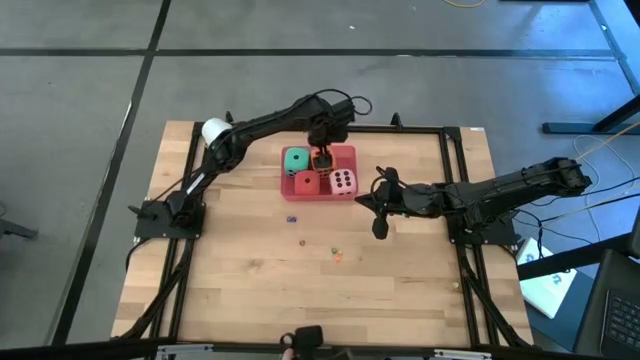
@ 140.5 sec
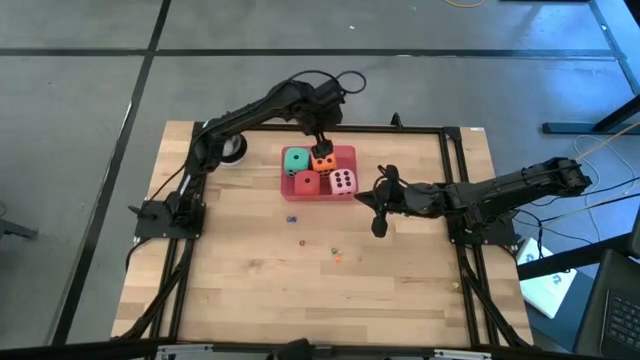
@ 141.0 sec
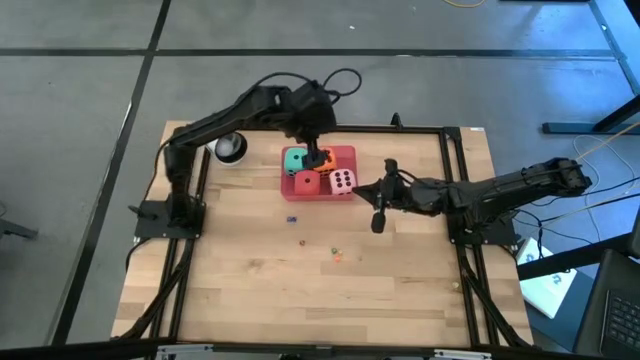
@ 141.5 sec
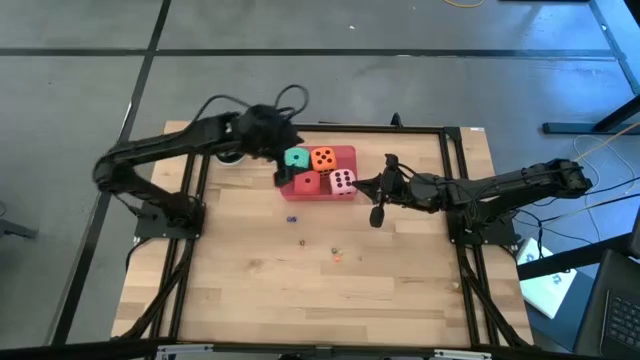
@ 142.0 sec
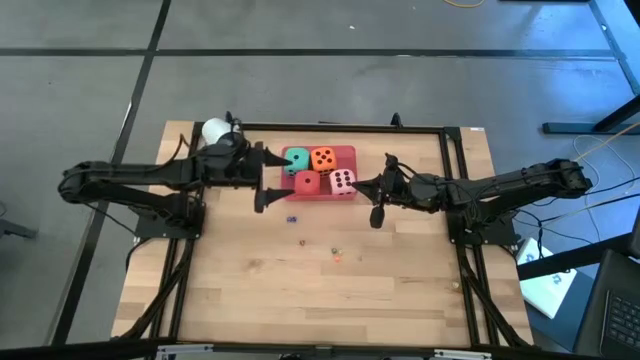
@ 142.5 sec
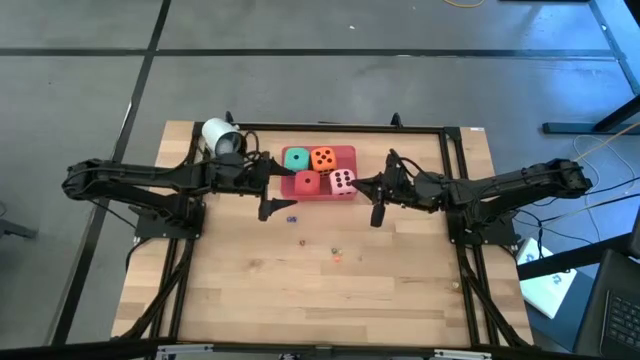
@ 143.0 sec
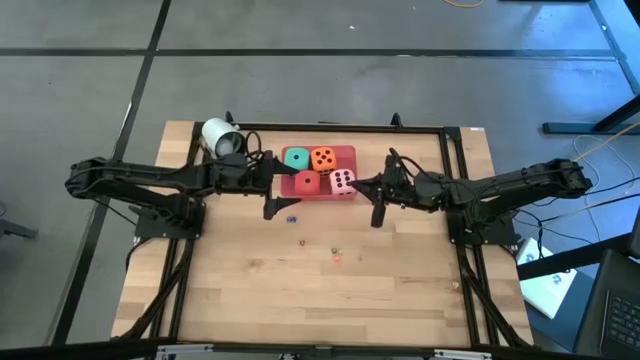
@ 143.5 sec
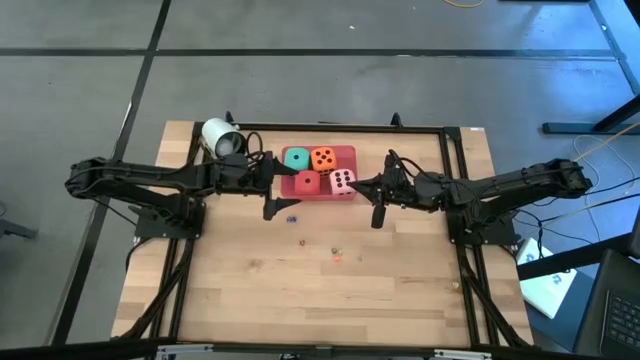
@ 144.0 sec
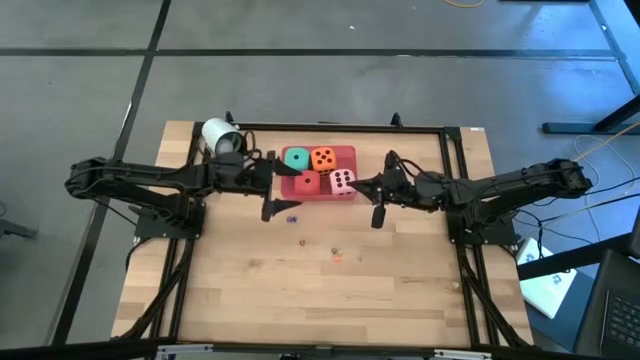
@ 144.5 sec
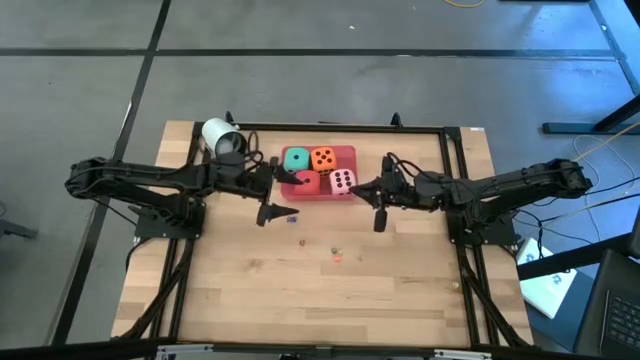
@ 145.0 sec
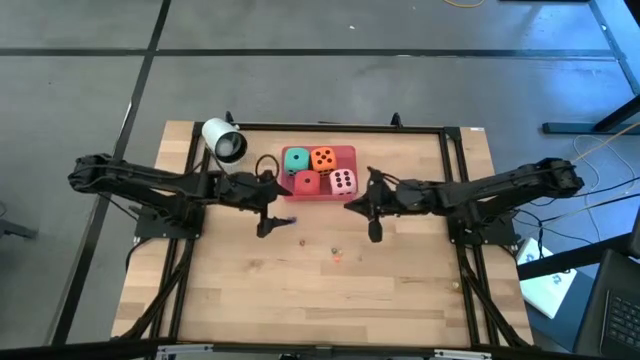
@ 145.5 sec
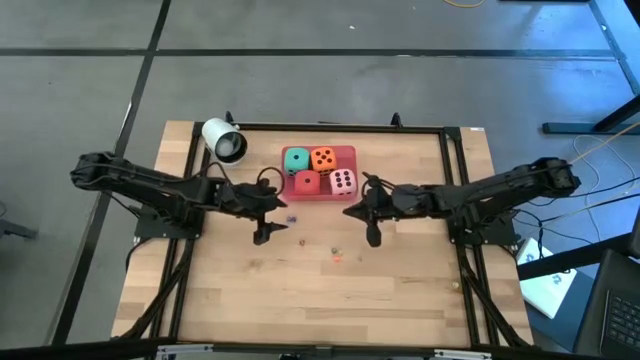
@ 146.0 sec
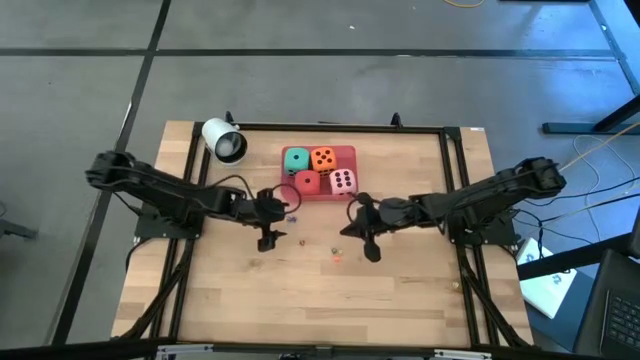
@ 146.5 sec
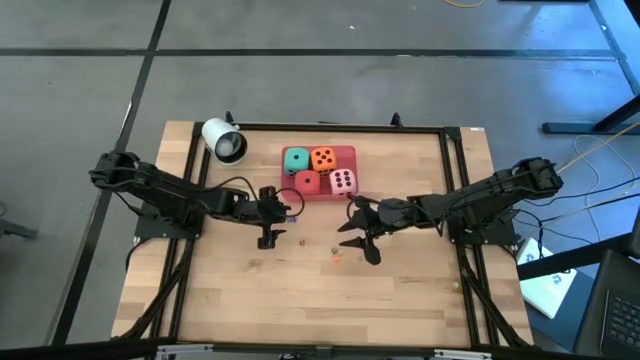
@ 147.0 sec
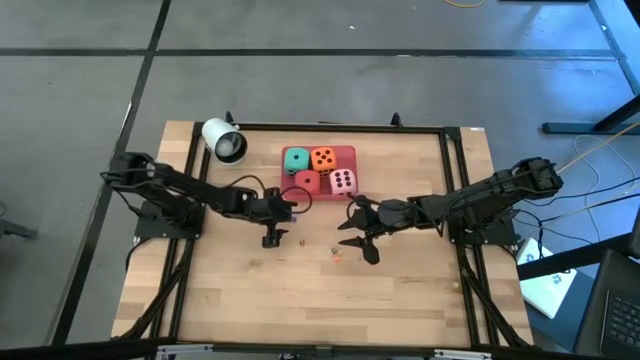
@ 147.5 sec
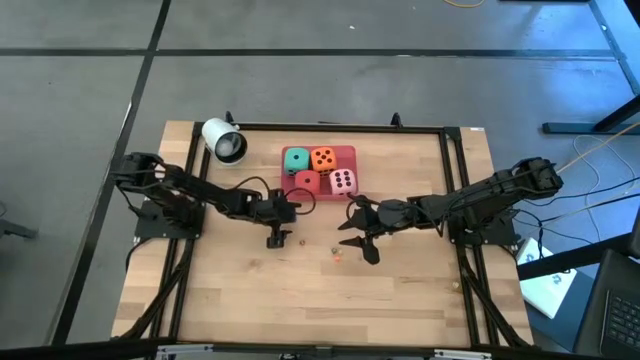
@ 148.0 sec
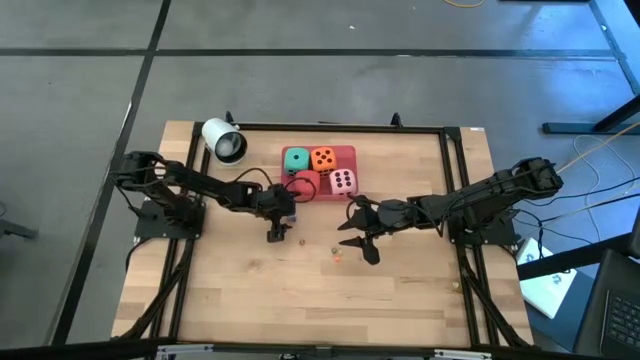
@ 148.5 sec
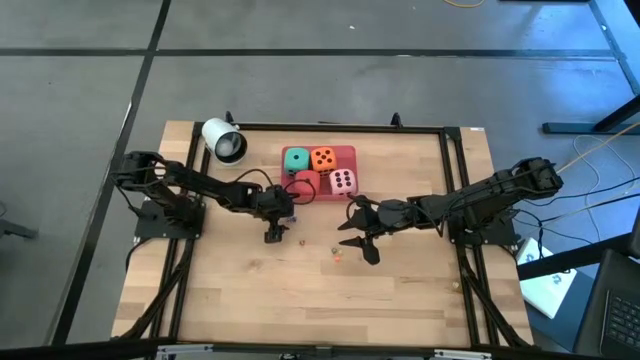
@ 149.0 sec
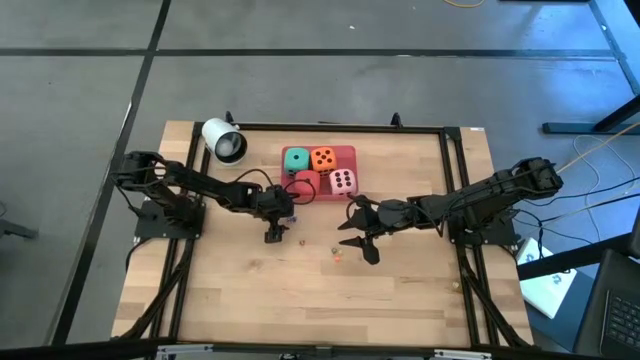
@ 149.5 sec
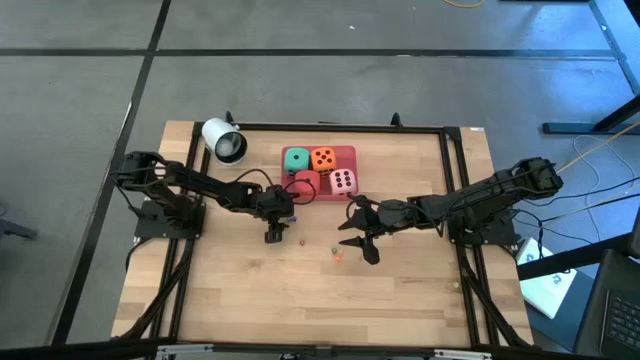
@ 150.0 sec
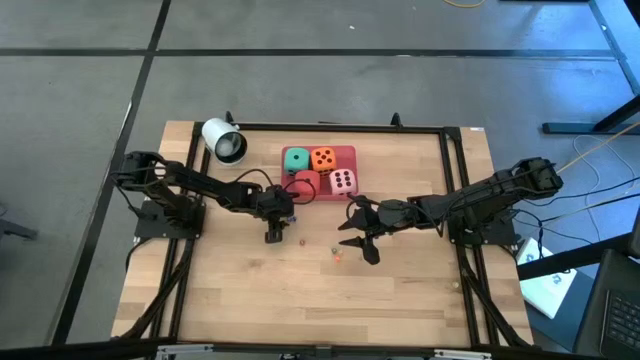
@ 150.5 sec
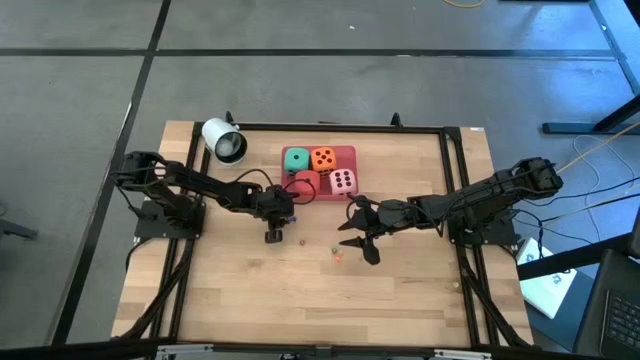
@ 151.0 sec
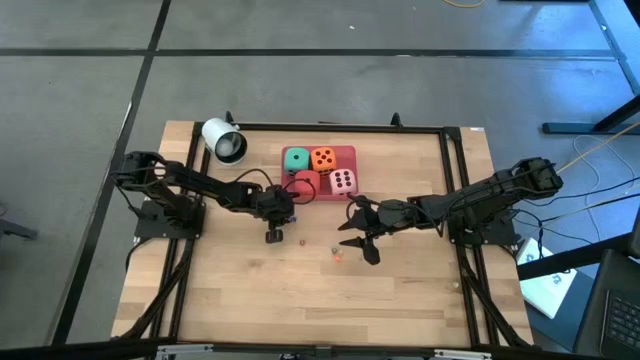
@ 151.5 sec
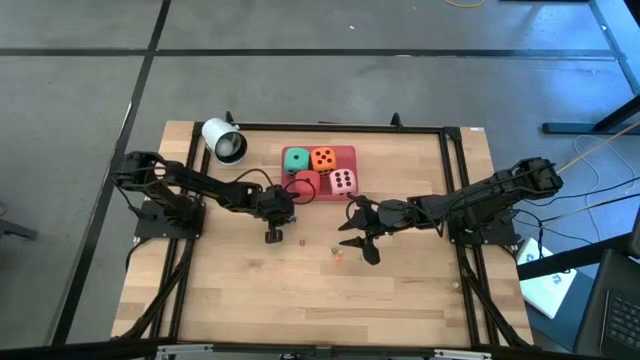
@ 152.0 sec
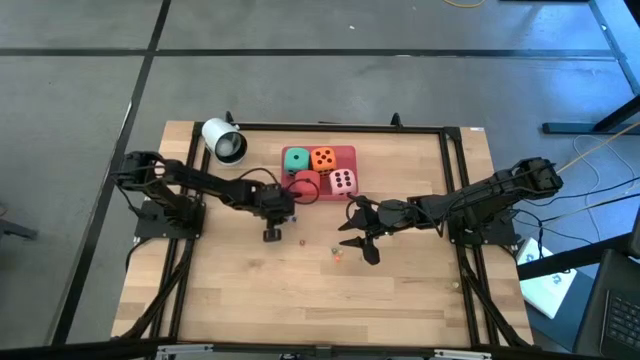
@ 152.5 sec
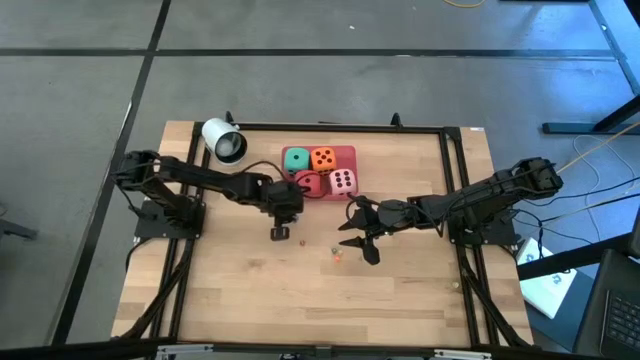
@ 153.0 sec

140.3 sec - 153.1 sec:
Task: Pick & Place Dice
Put the left small blue dice into the pink bin

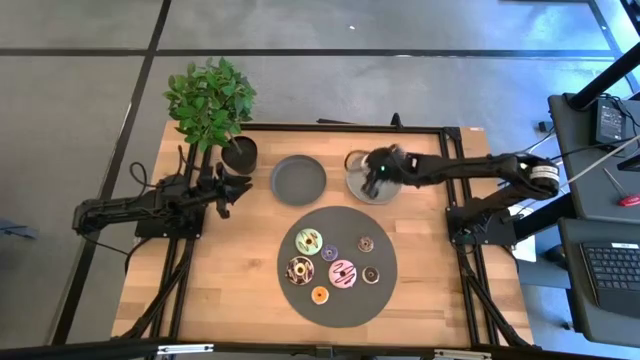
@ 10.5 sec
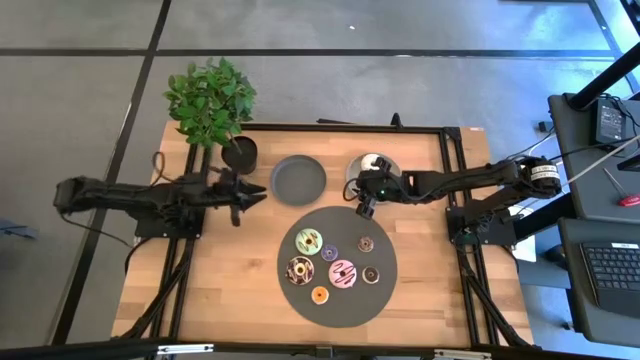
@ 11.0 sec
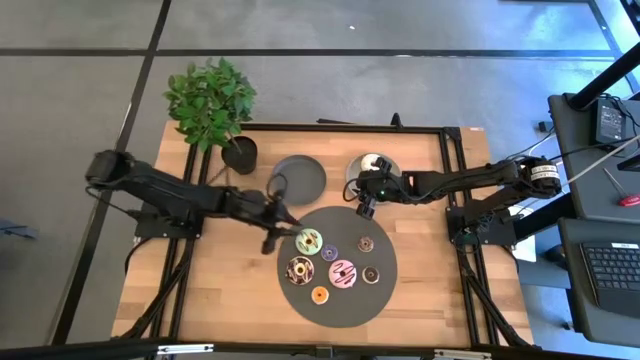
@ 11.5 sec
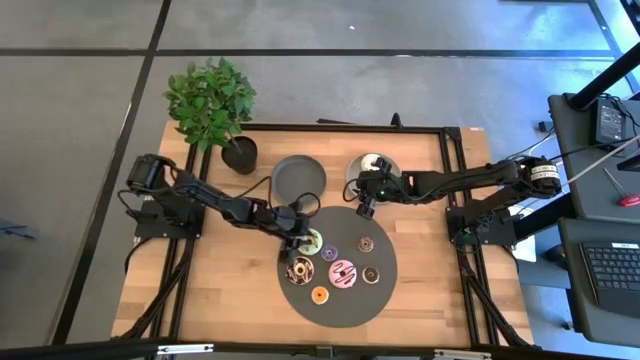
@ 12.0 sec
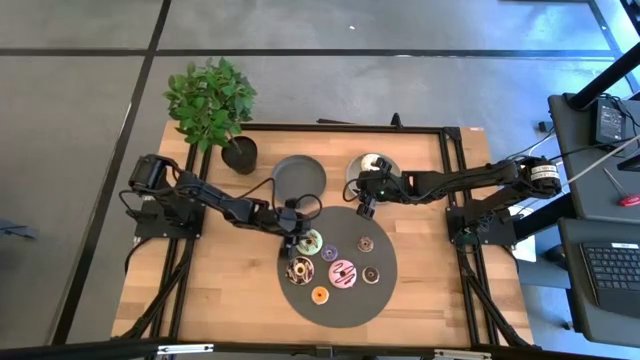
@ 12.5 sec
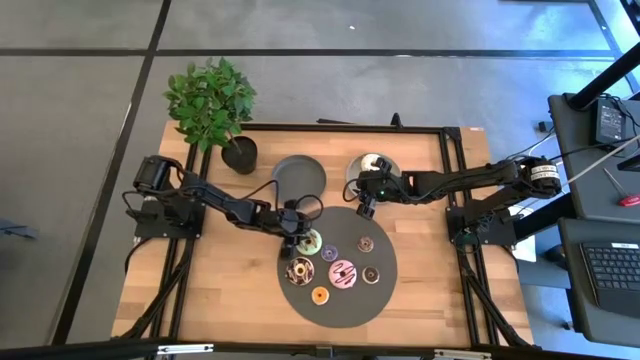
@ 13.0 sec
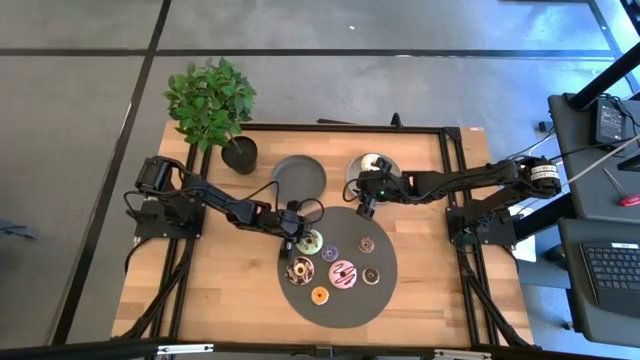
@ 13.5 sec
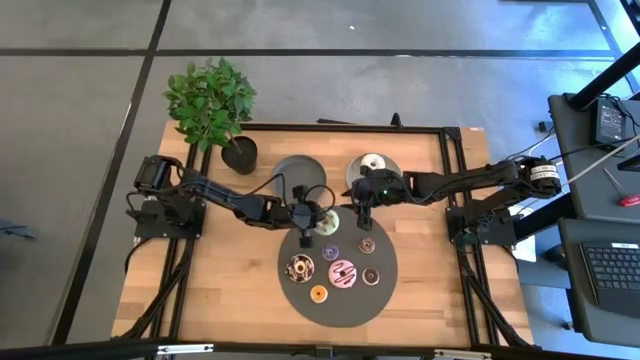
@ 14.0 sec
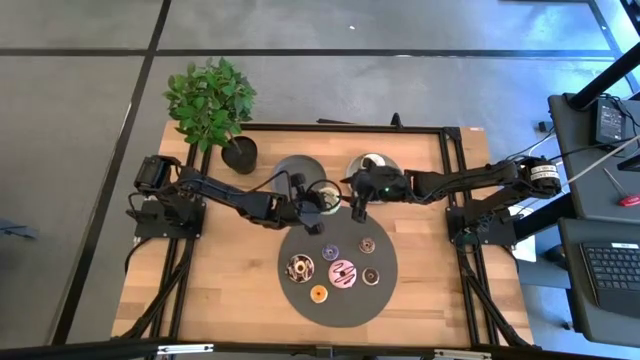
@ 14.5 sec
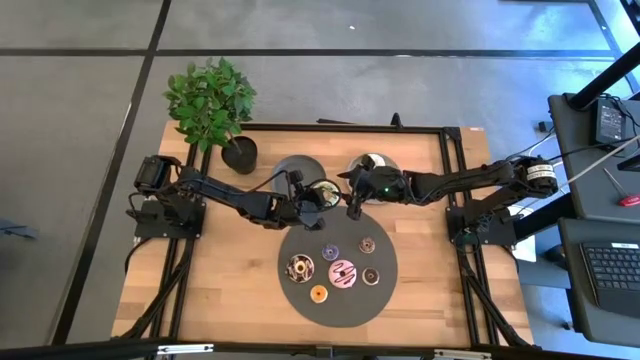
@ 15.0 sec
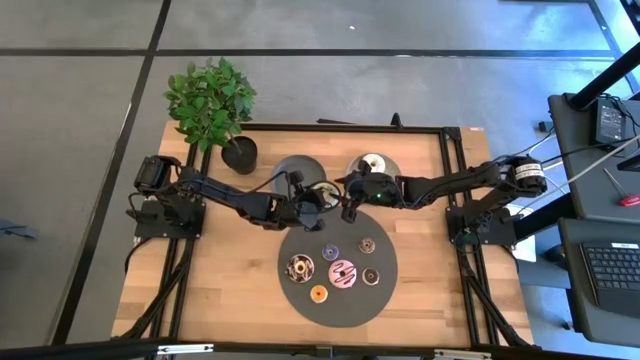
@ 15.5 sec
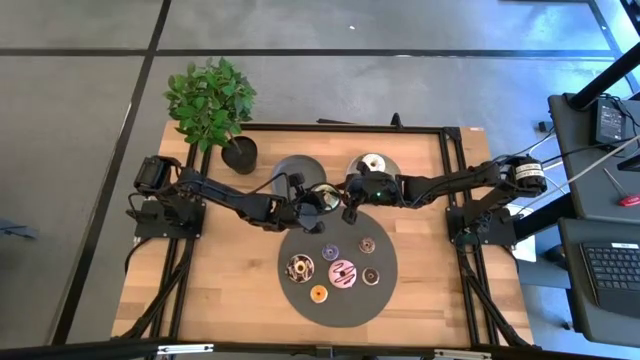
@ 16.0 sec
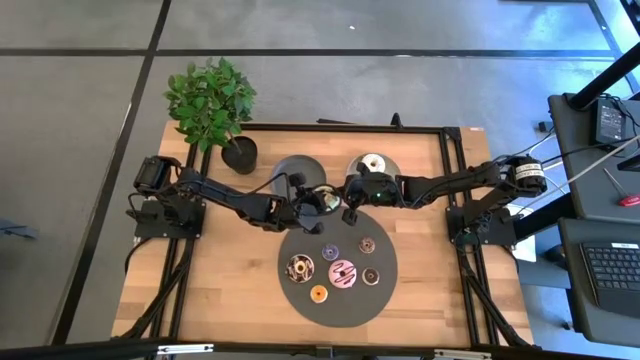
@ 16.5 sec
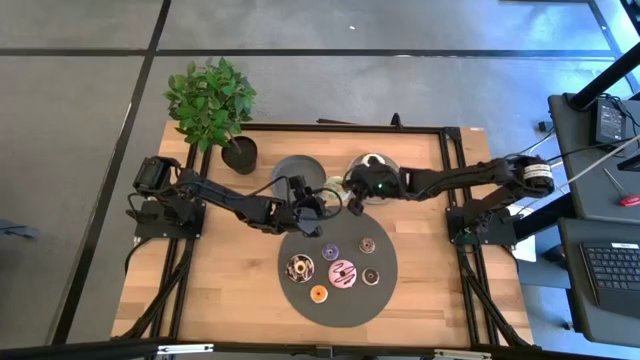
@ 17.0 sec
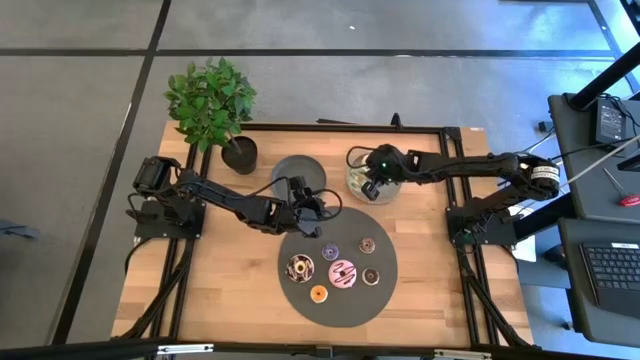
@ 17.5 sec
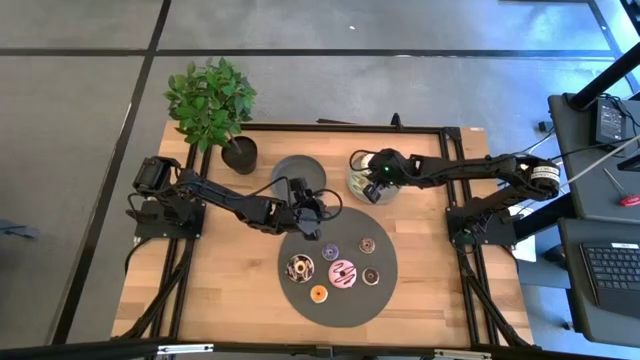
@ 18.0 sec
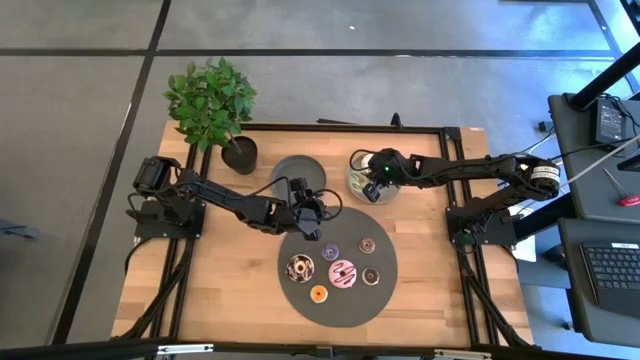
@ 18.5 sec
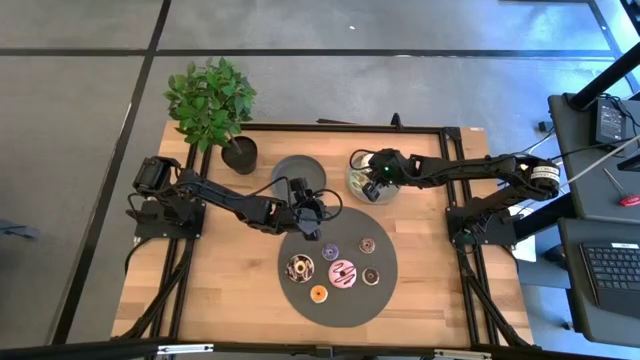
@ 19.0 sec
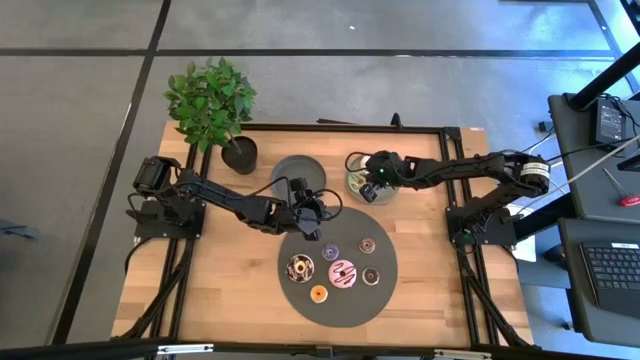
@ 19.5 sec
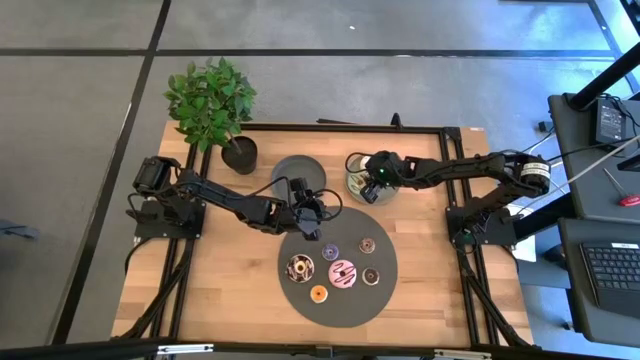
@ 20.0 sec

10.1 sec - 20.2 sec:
Task: Pick & Place donuts
Put the large blue donut on the light gray plate
